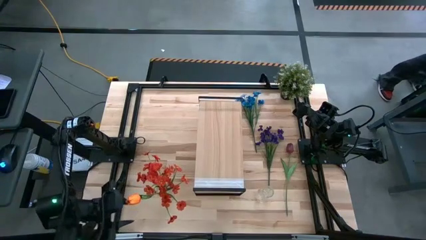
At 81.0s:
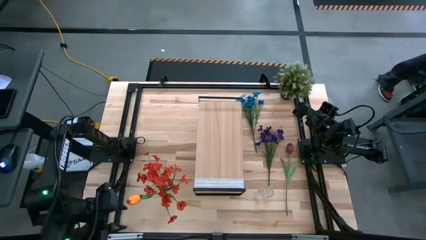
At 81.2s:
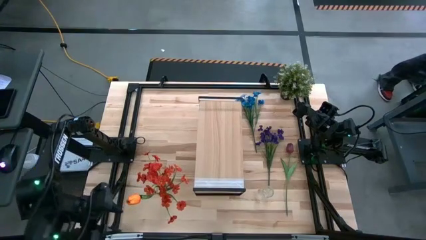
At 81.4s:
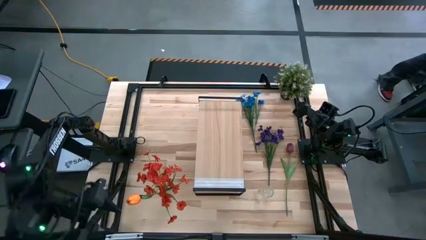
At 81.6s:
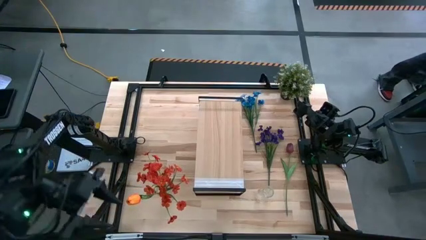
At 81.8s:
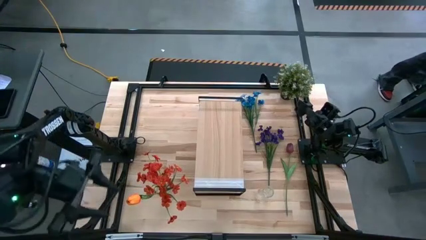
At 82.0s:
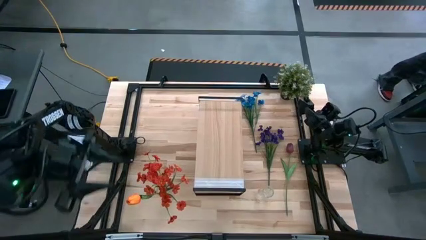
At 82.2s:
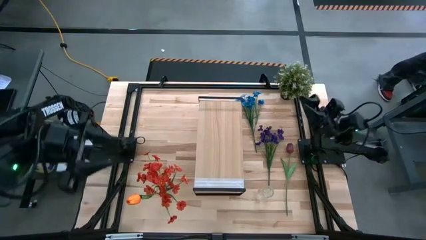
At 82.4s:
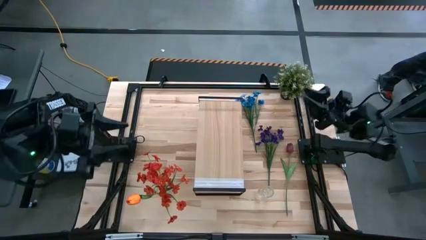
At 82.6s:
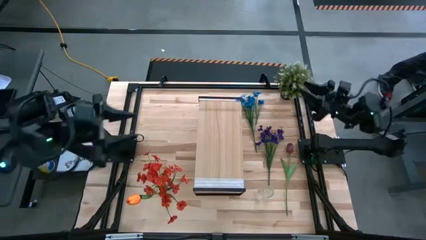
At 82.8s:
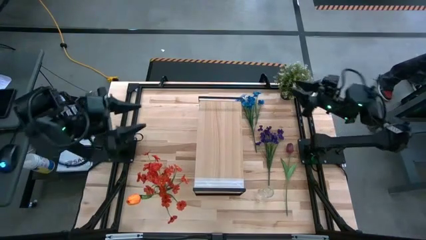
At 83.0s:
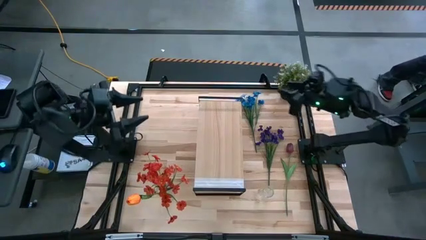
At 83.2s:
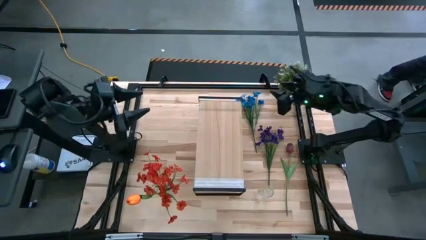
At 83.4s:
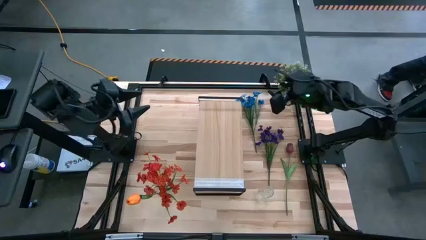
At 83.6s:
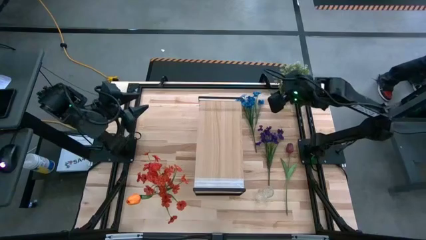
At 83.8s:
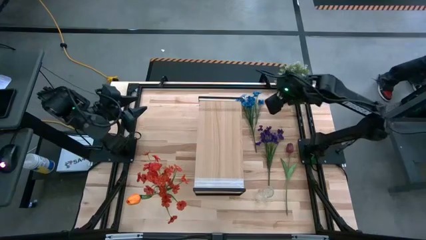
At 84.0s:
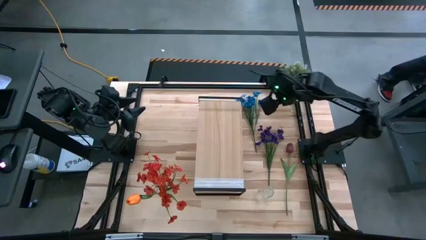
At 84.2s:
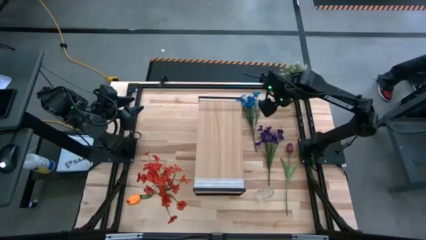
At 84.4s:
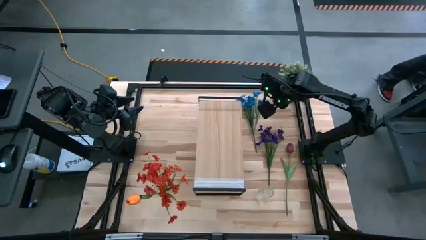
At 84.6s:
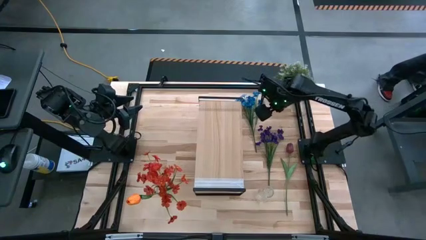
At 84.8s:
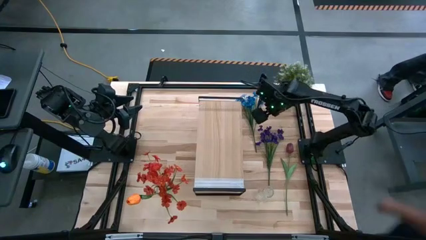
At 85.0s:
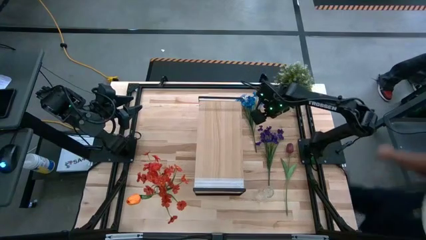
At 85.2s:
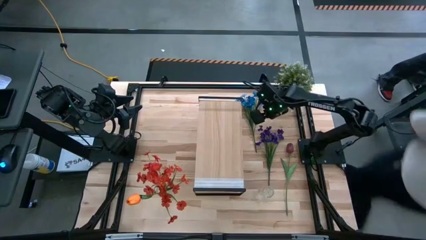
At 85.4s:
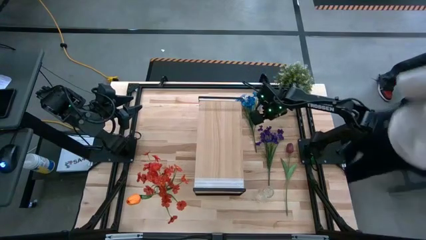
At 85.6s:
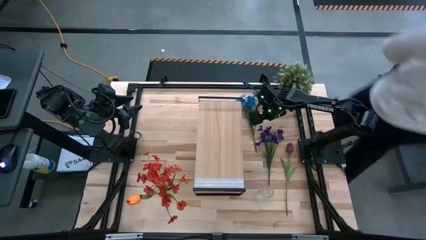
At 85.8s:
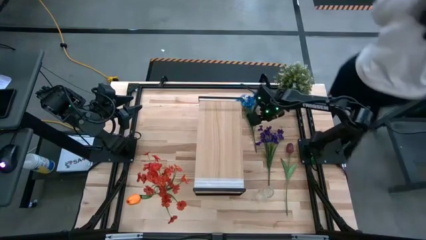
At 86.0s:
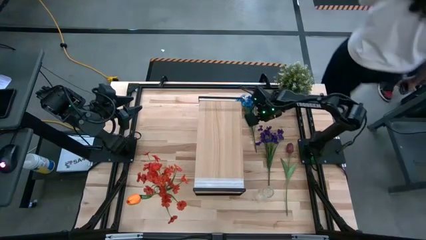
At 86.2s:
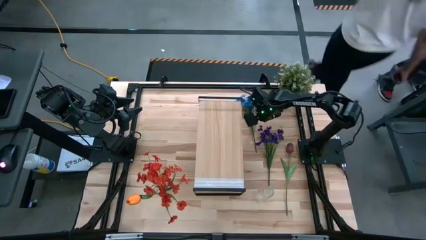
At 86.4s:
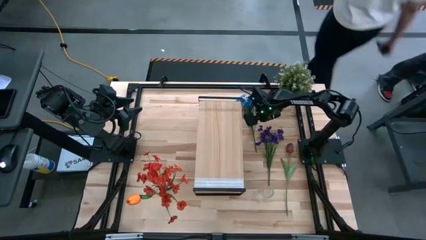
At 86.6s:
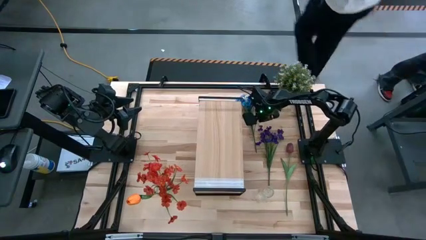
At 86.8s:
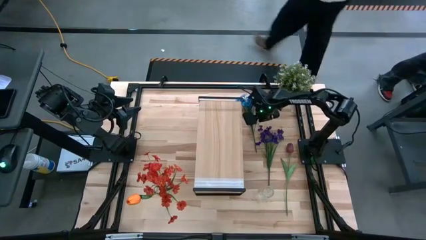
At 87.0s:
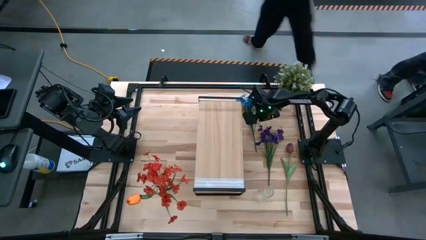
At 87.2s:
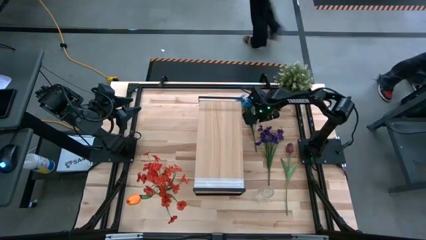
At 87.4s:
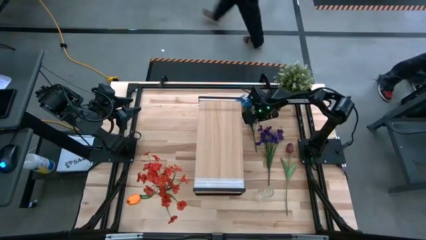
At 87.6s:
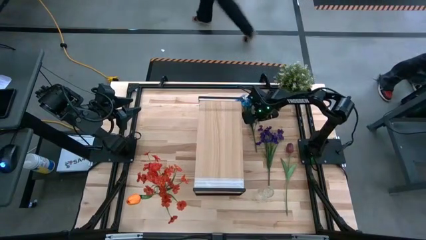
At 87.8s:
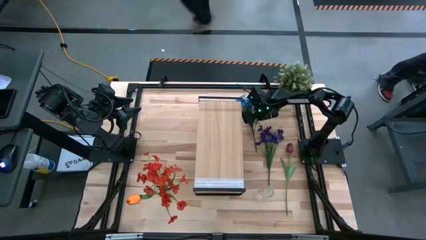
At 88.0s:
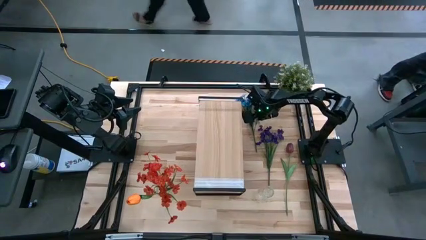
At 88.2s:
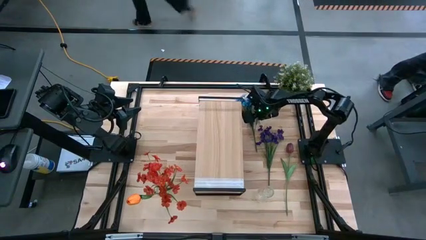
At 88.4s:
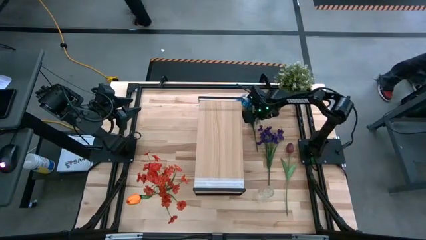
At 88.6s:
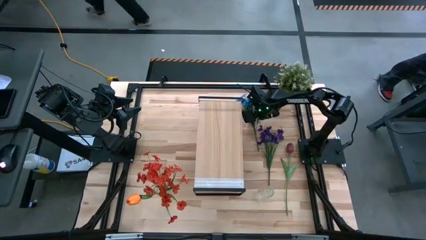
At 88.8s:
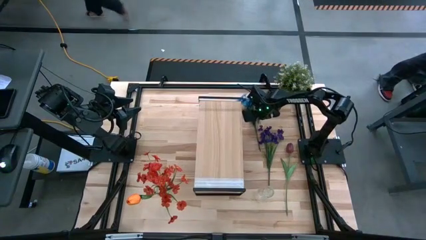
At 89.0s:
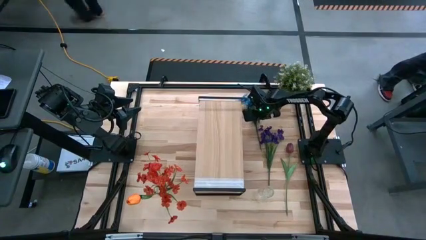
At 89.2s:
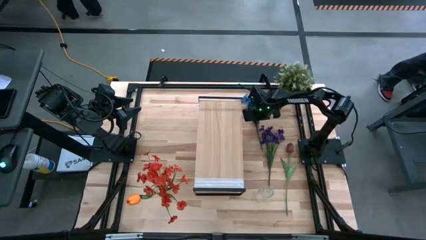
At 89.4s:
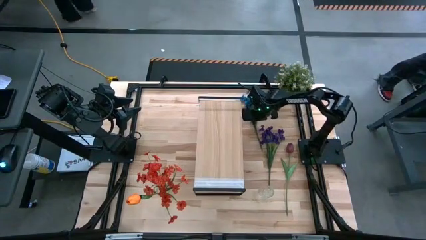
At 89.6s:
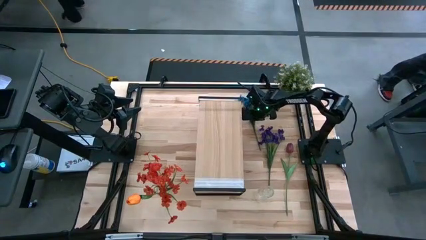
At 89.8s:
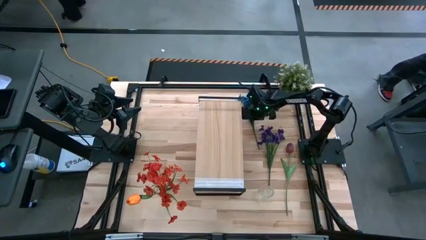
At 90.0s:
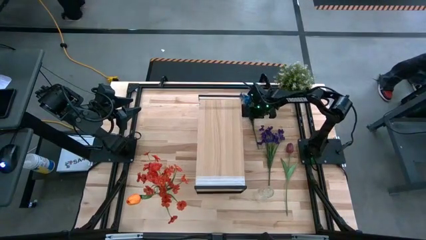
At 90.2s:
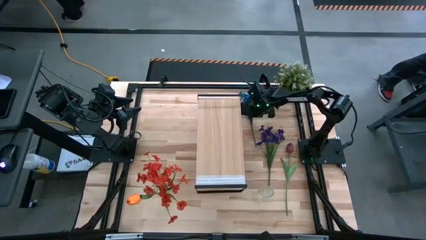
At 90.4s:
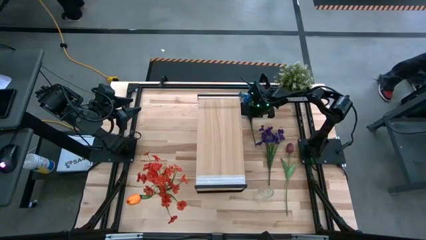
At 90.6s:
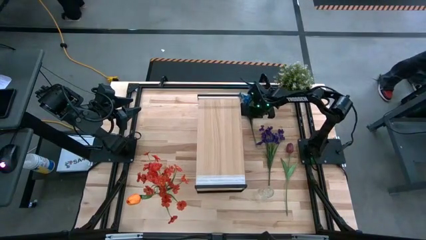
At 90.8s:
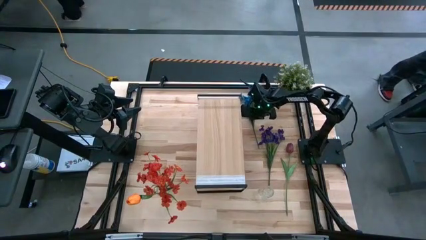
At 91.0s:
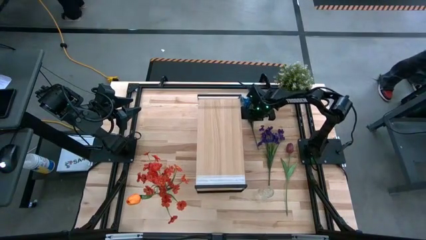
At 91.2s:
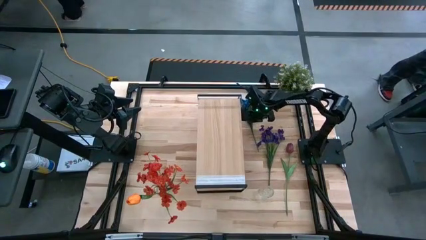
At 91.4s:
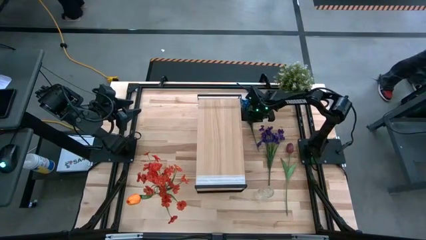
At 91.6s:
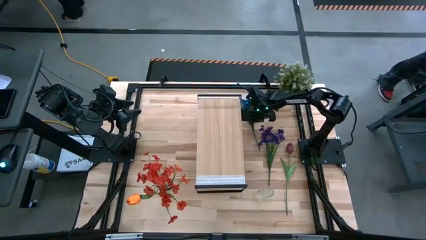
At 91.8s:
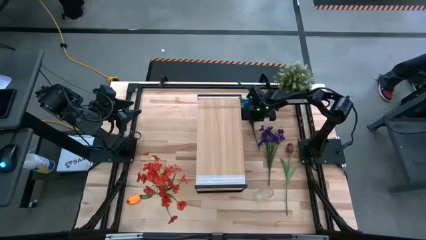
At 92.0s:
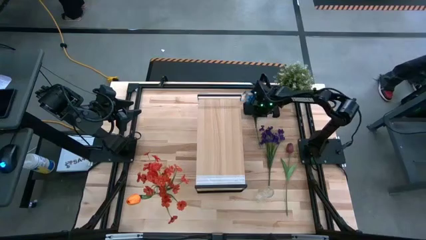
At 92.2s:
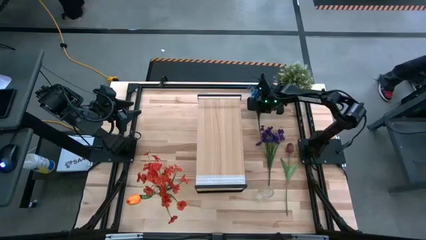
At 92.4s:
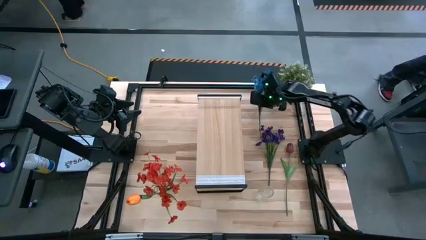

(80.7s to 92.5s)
Task: Pick and place flowers into a vace then onto a shelf
Put the blue flowers into the right transparent vase

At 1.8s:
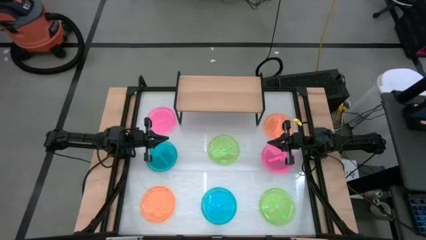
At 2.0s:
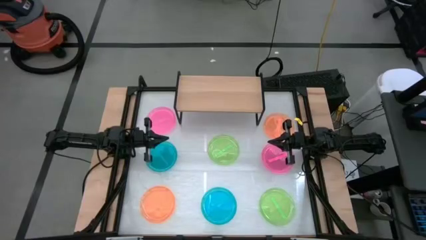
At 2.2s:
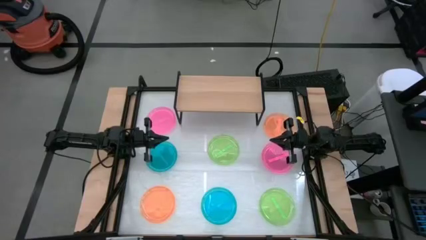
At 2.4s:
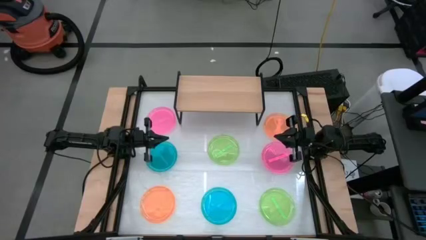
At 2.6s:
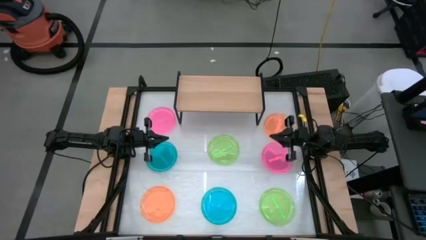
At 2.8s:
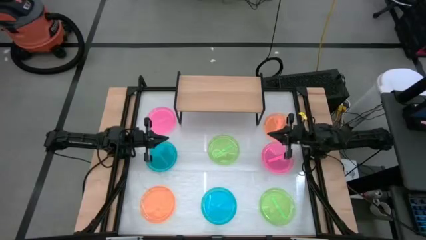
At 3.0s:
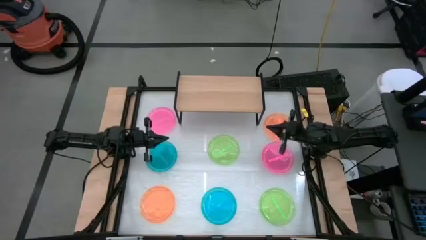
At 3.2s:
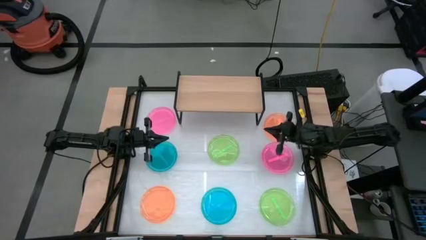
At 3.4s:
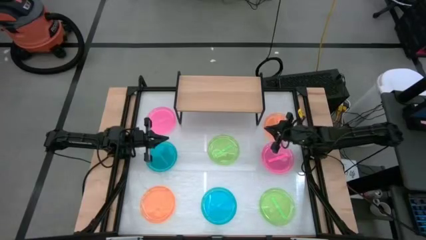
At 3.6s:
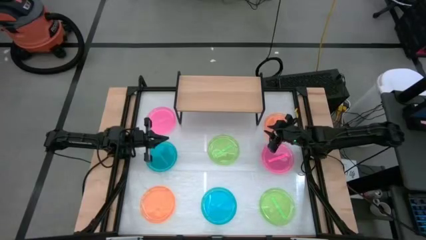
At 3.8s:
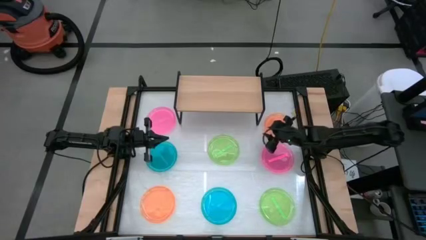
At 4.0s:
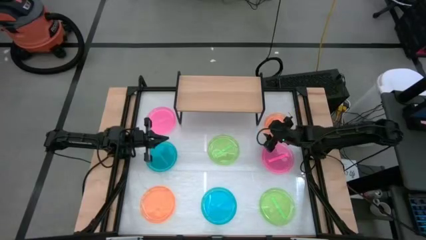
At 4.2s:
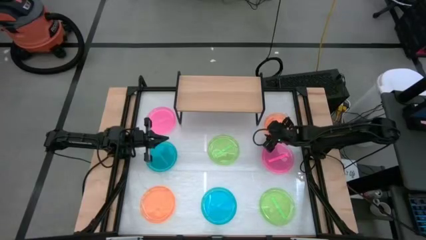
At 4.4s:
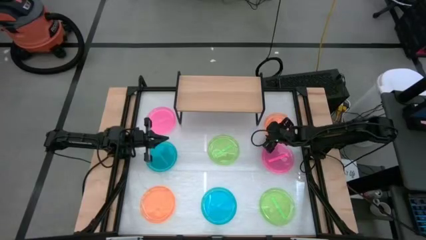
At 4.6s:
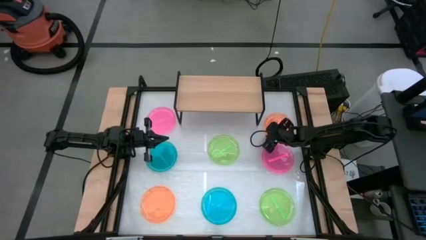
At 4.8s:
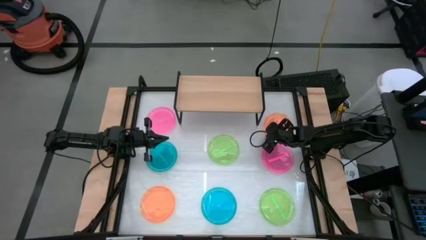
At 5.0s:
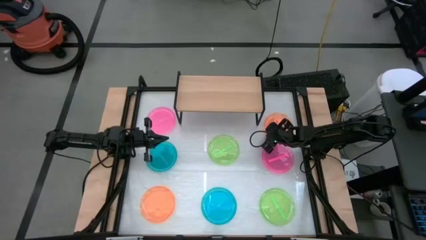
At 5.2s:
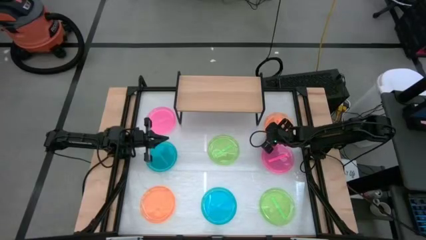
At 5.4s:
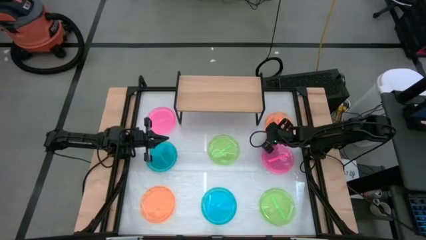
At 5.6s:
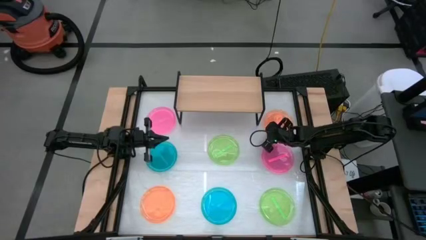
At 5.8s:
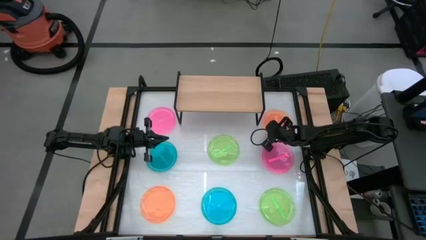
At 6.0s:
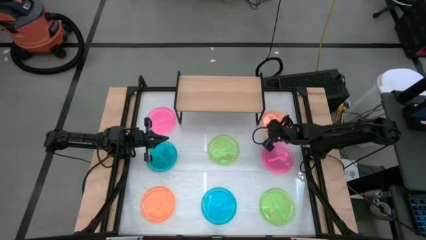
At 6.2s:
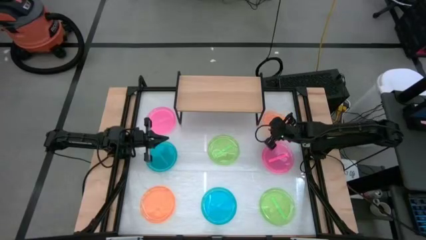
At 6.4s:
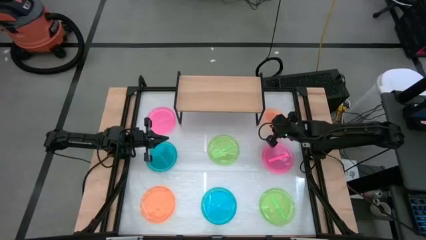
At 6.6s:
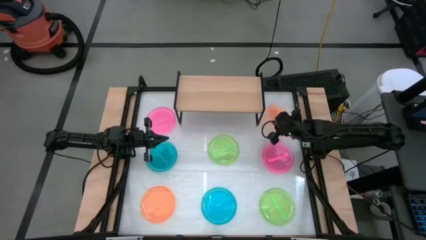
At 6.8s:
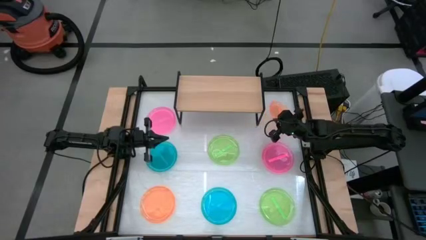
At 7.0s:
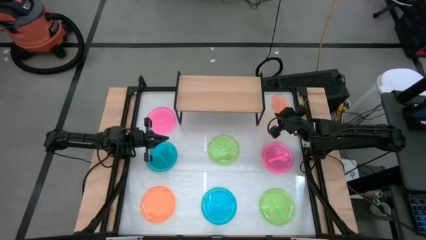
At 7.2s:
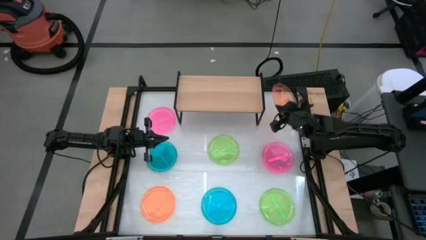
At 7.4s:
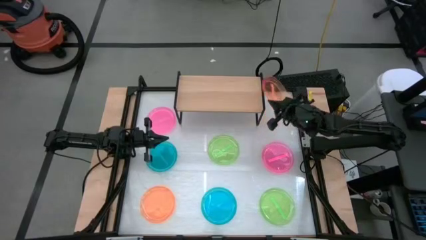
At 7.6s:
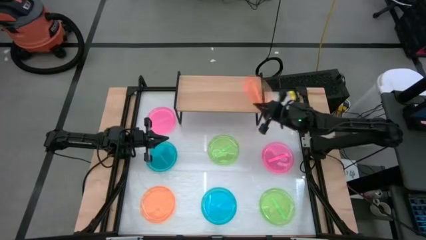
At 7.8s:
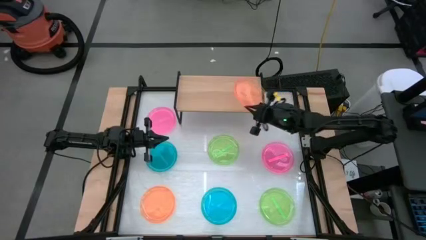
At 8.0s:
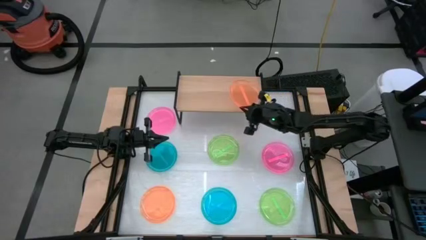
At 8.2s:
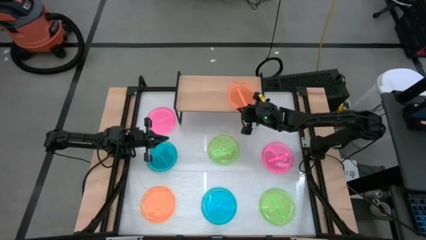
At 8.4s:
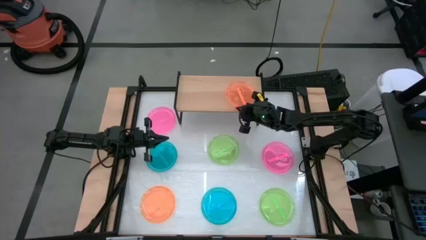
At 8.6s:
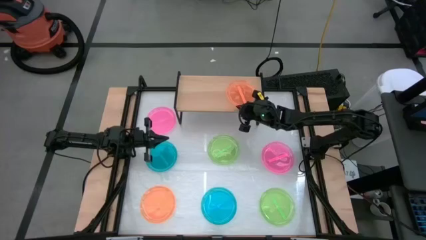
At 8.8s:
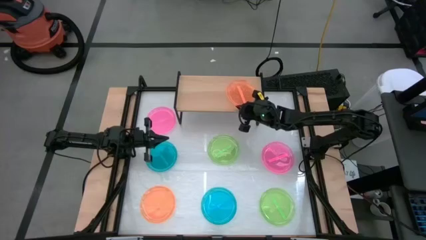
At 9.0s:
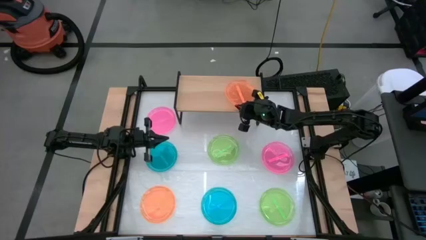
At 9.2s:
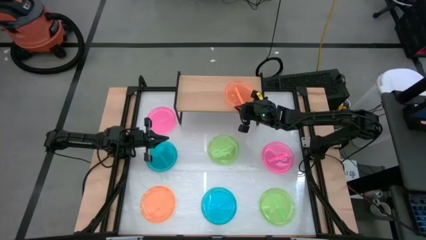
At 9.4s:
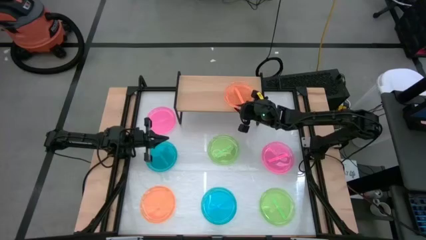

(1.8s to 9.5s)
Task: Place and stack plates onto a shelf
Put the top orange plate on the shelf
